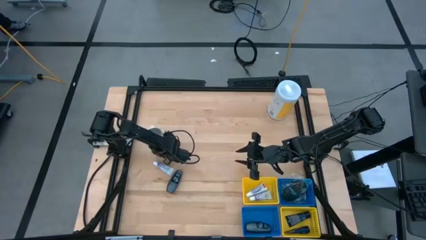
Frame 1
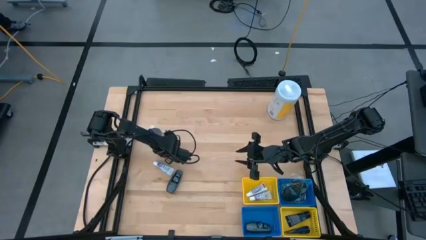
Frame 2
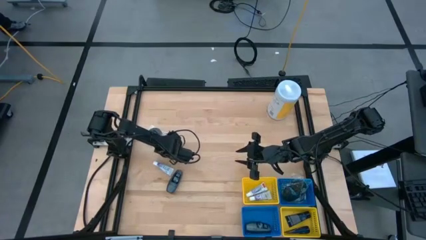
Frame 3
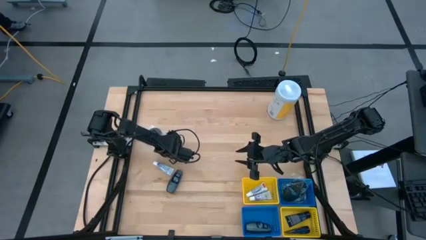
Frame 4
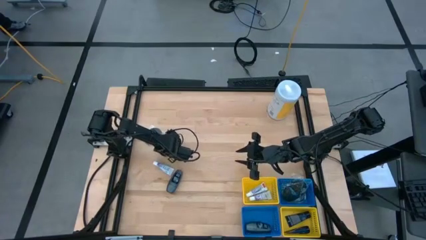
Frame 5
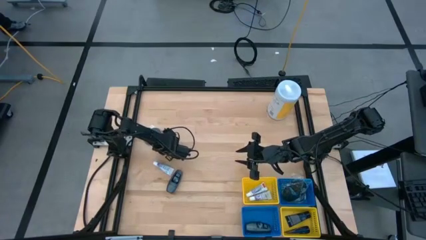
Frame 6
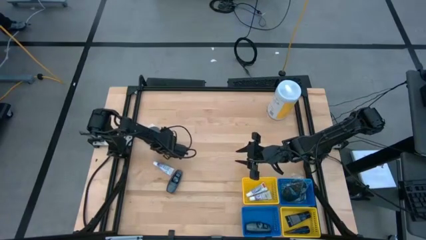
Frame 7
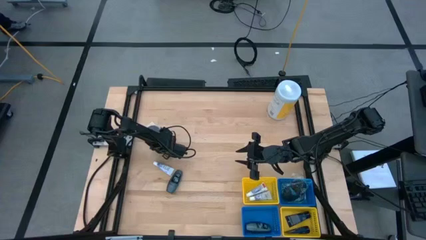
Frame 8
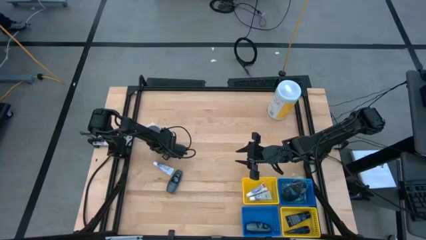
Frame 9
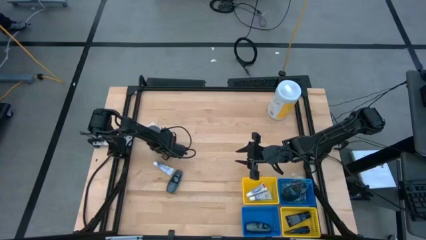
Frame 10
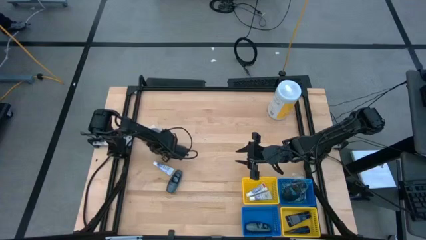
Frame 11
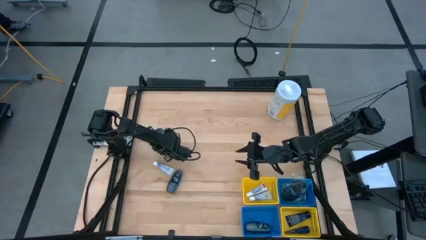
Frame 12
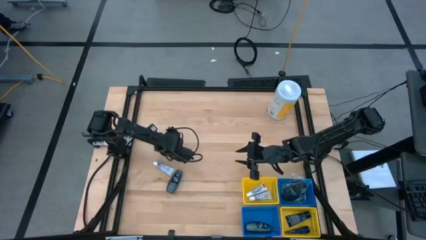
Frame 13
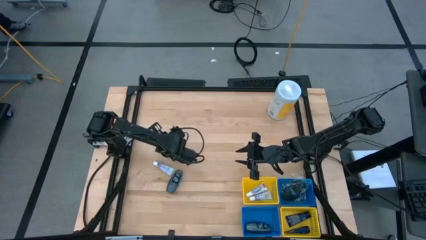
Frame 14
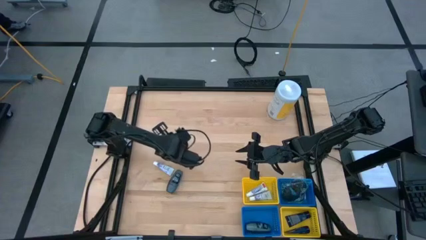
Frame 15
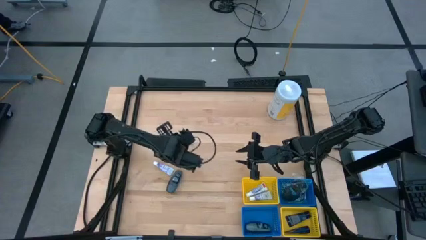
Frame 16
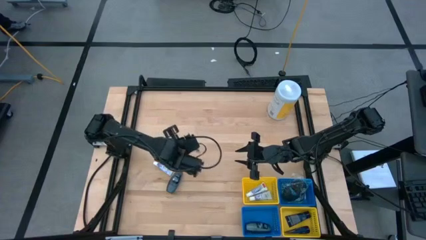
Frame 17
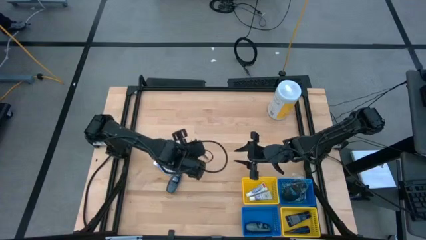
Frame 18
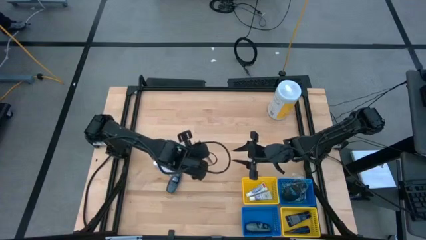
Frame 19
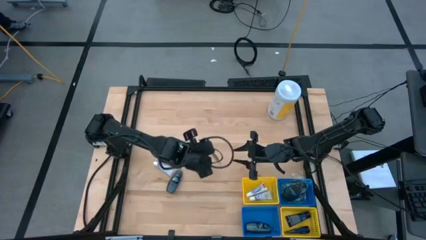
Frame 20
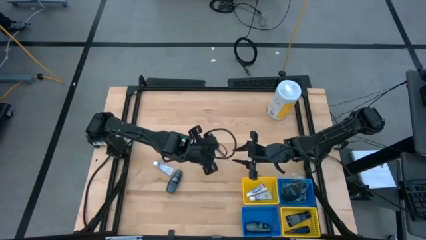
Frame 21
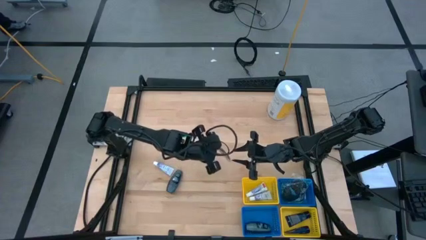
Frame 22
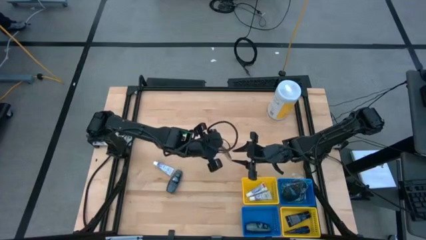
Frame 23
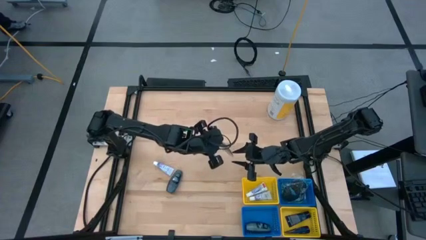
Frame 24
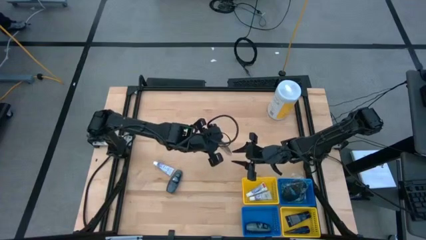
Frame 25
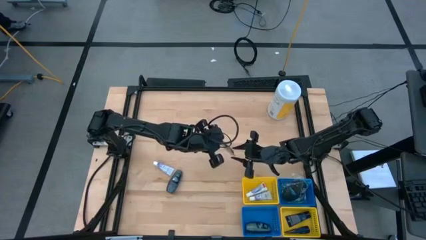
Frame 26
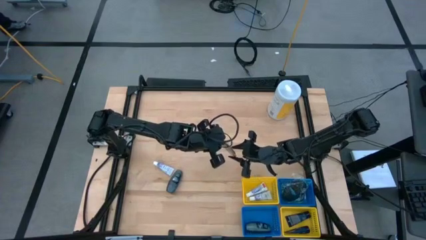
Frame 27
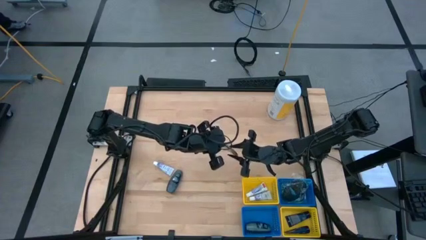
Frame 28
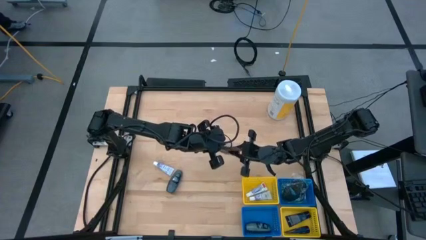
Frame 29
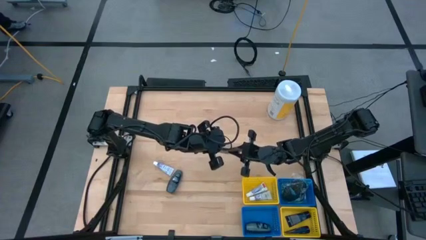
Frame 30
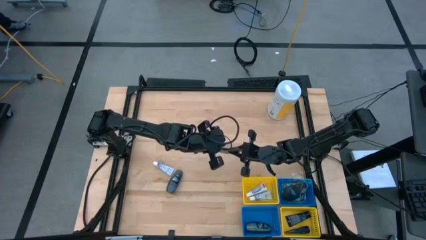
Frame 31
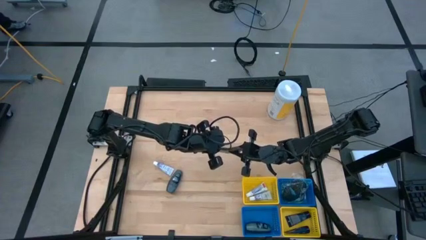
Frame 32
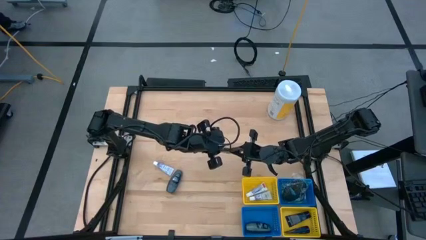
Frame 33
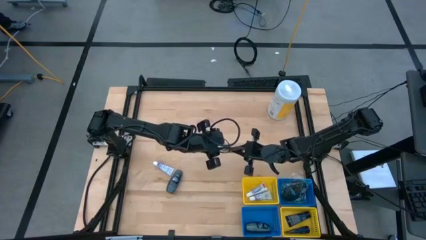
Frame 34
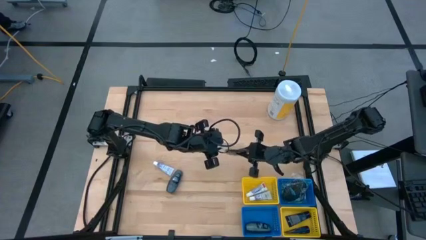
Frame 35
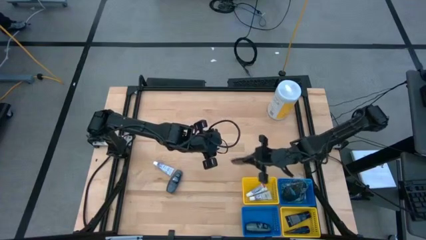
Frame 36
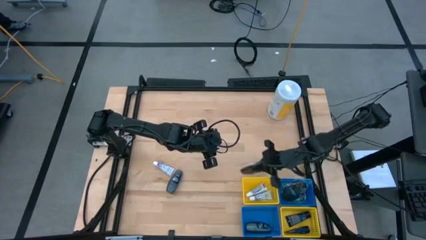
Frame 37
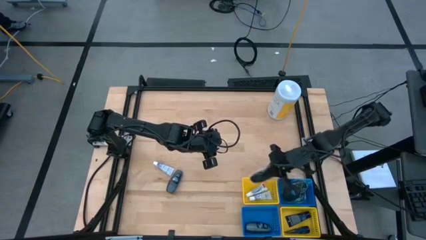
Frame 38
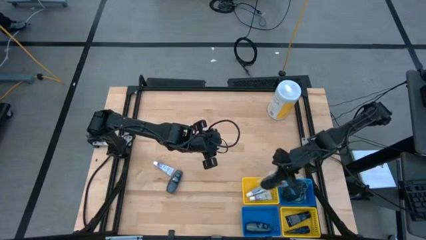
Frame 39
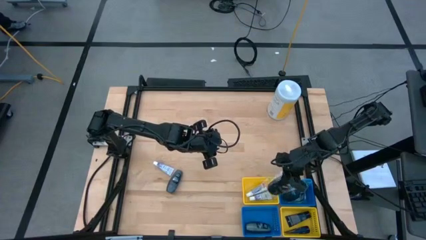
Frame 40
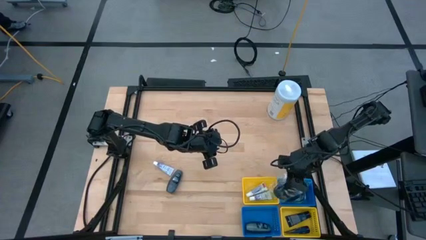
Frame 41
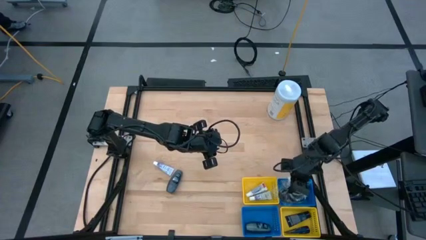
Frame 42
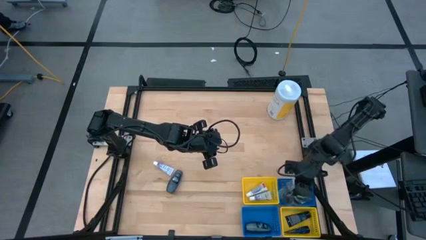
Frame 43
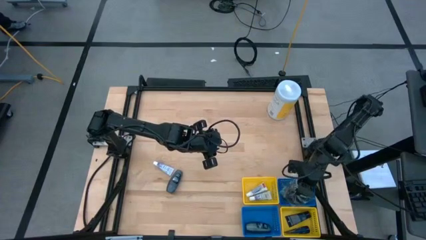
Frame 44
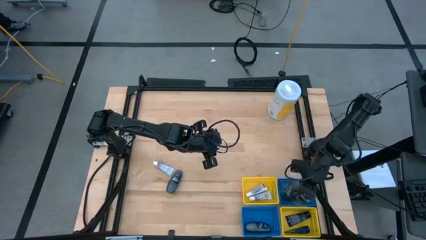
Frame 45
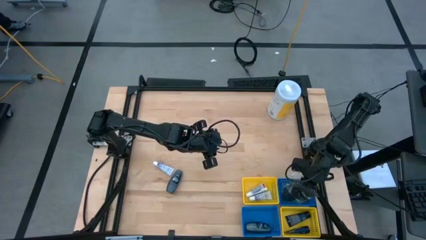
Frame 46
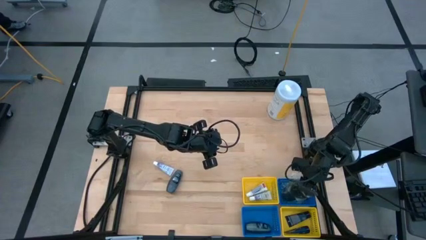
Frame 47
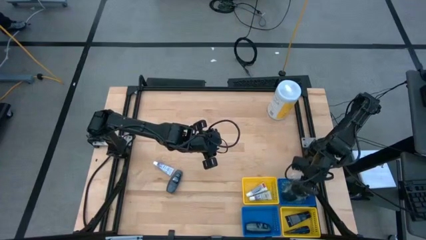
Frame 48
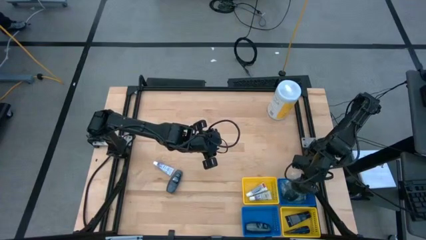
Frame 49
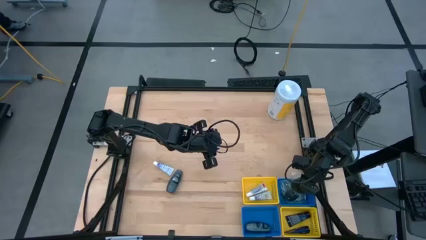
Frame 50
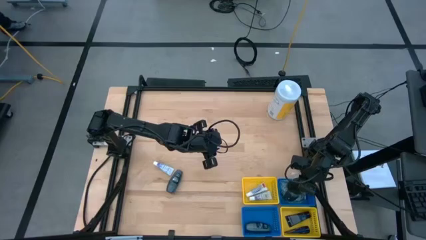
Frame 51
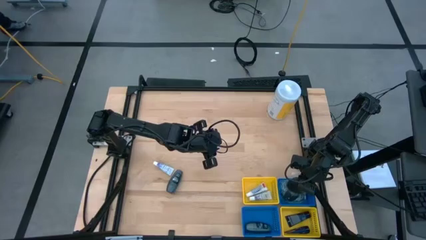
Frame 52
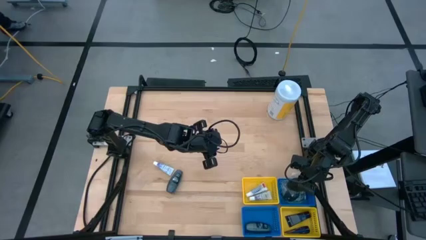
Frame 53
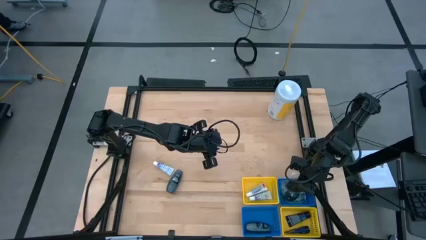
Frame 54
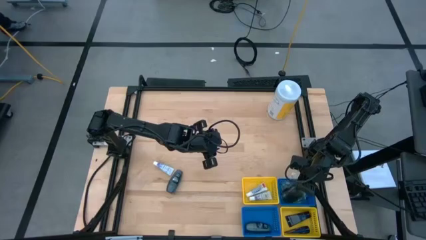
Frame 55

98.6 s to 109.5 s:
Task: Pick & Place Travel size toiletries
Put the black hairbrush into the top blue bin

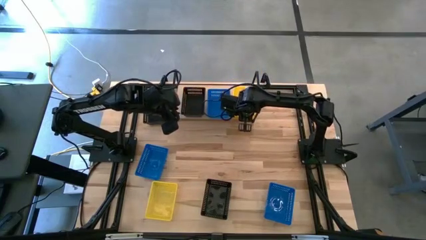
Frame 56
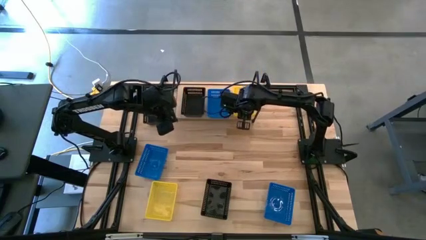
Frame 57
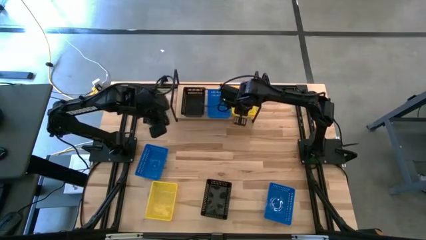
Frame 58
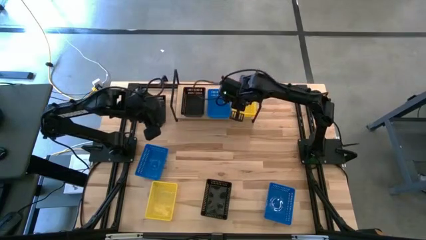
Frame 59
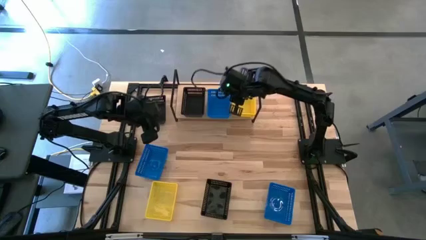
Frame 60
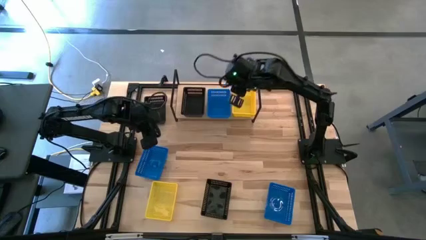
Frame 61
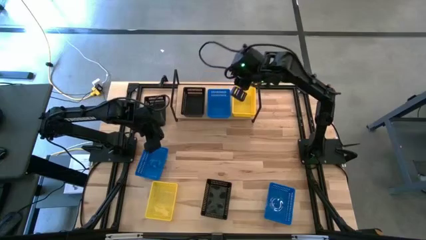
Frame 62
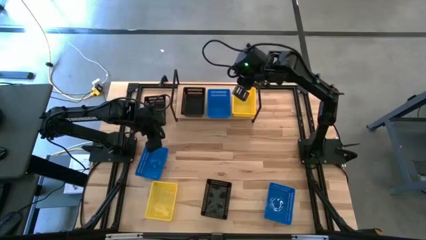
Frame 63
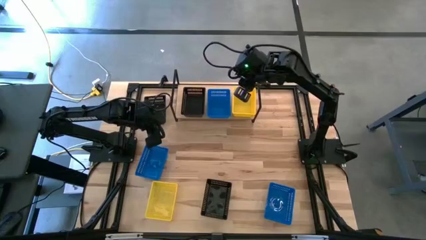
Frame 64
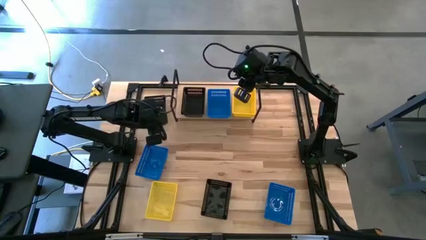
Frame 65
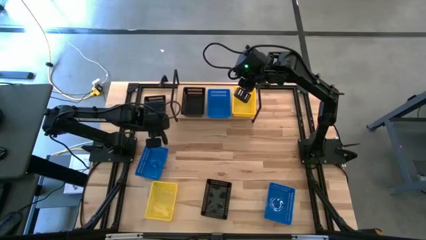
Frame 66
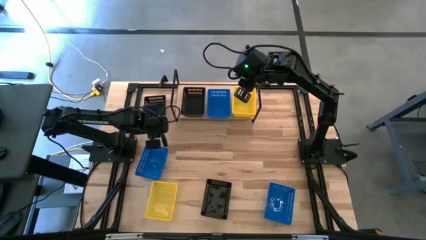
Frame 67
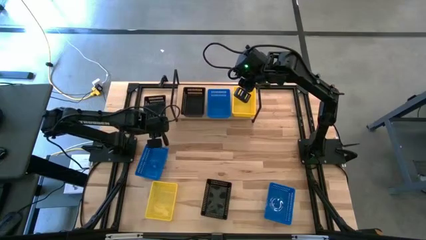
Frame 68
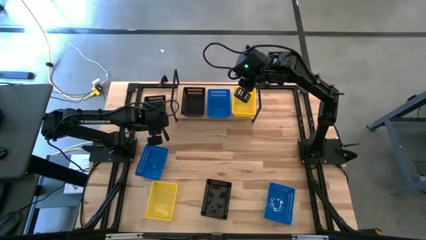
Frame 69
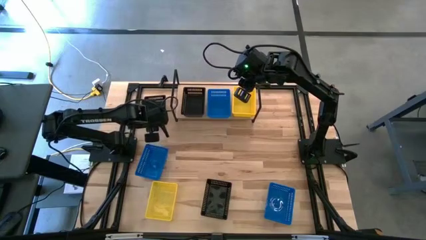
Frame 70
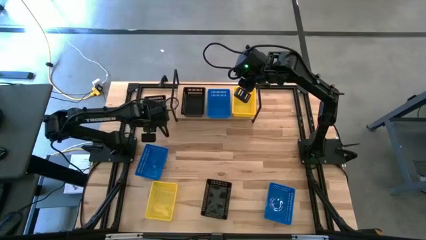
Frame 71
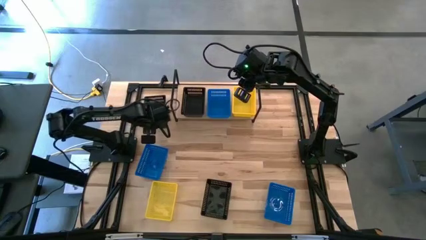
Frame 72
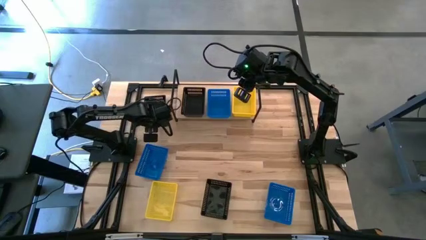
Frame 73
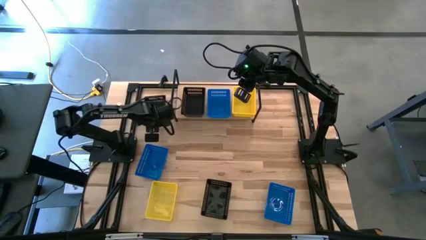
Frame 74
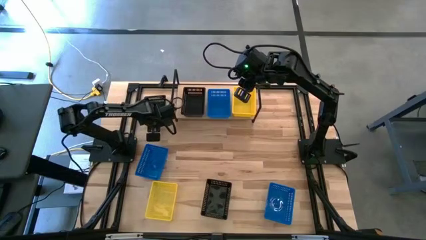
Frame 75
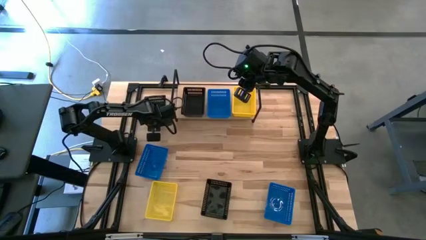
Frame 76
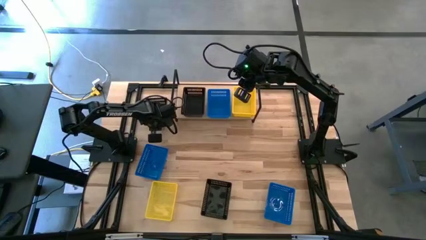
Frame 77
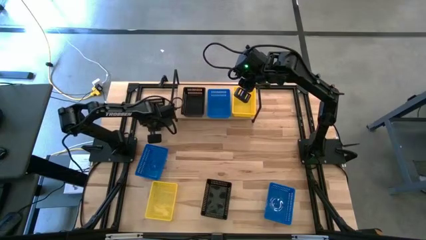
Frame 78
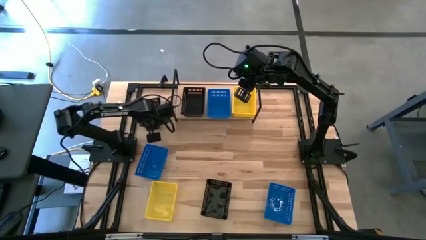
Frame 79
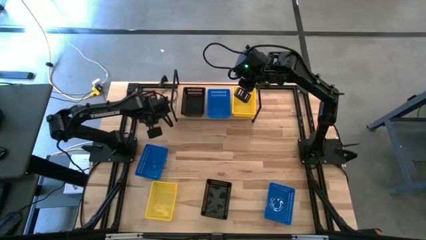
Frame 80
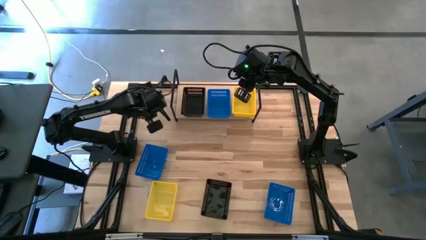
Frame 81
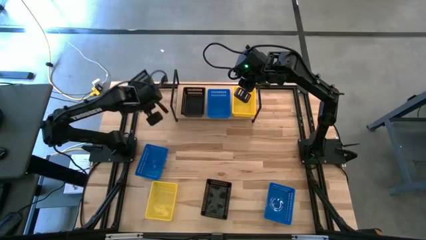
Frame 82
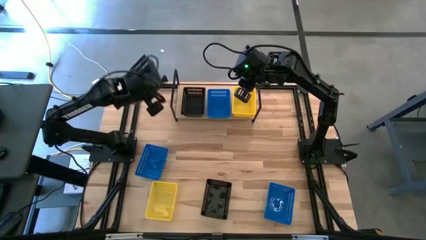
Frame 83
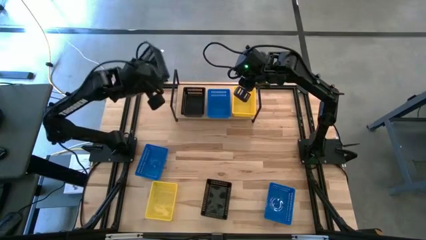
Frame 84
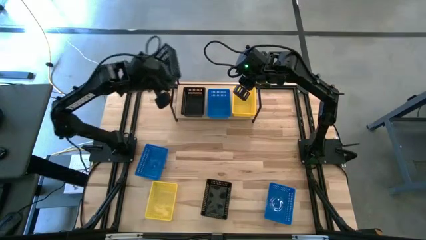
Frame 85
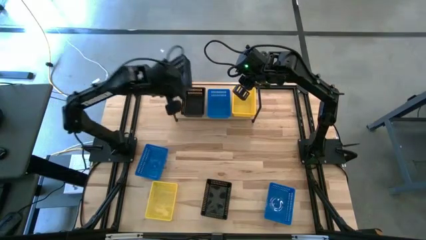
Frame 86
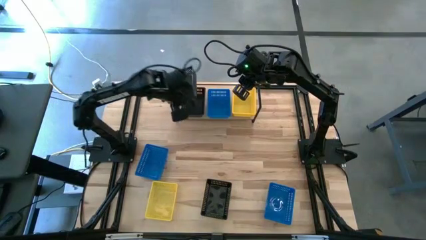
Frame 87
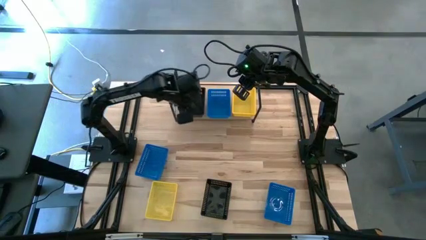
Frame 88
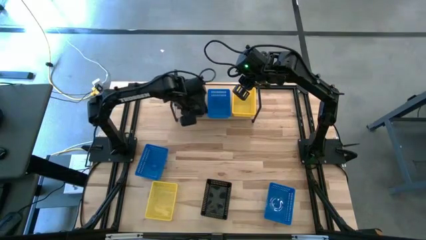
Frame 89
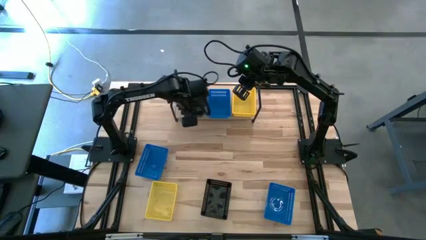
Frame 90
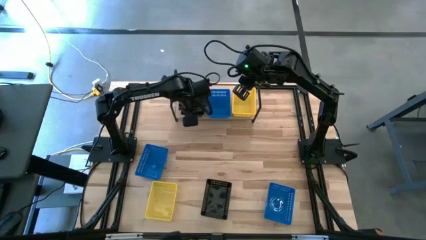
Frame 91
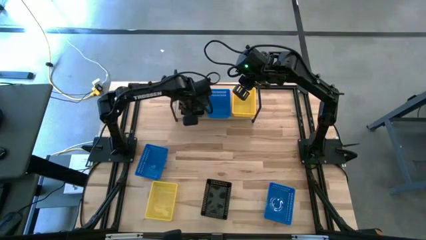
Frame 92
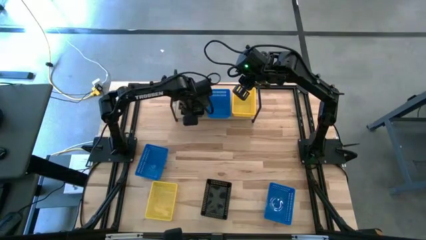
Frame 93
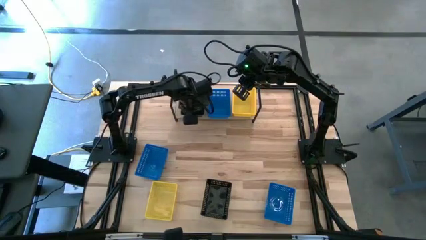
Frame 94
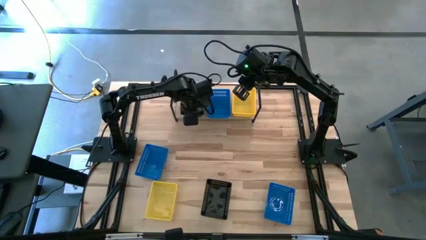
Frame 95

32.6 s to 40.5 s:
Task: Stack baskets on shelf by color
Stack the top black bin on top of the black bin on the shelf
